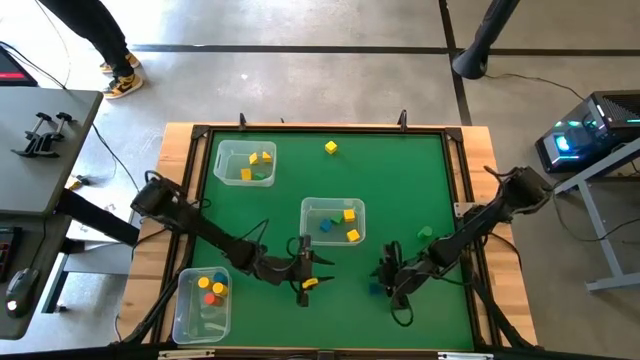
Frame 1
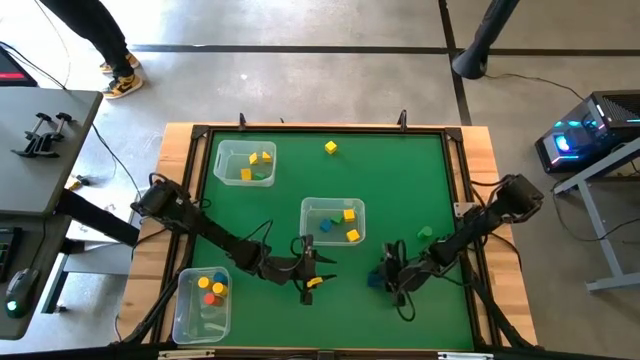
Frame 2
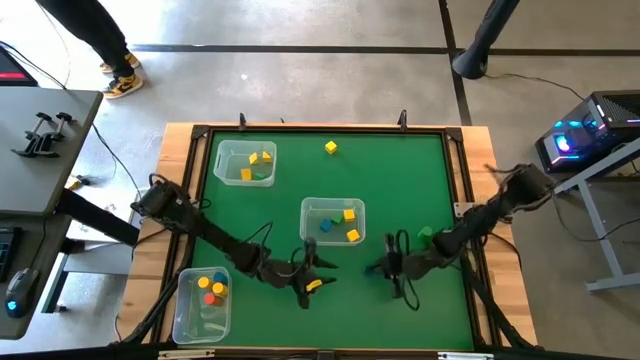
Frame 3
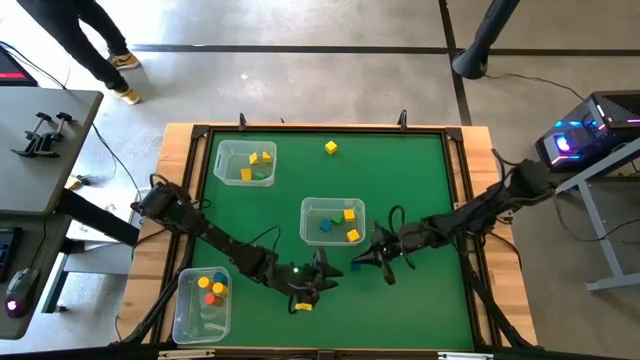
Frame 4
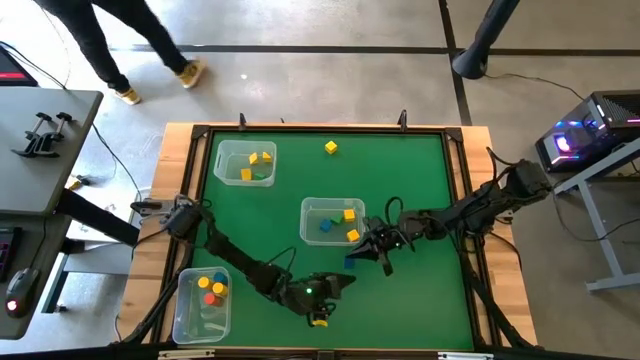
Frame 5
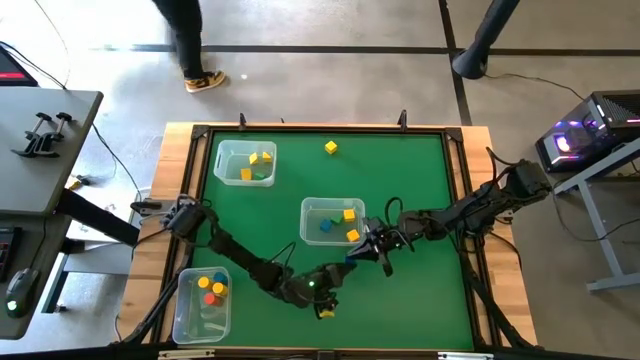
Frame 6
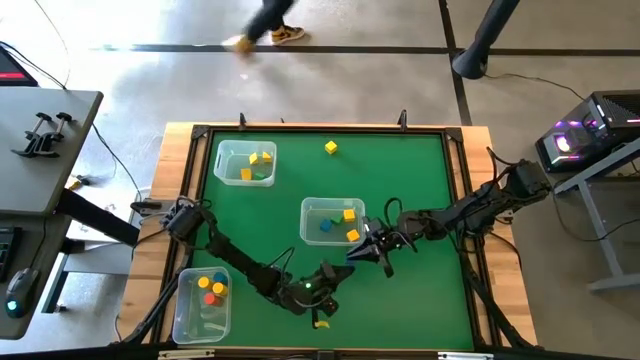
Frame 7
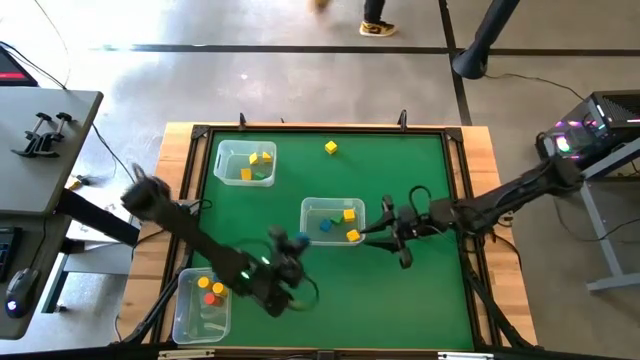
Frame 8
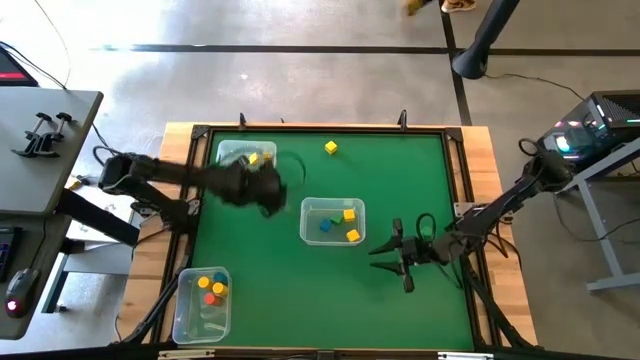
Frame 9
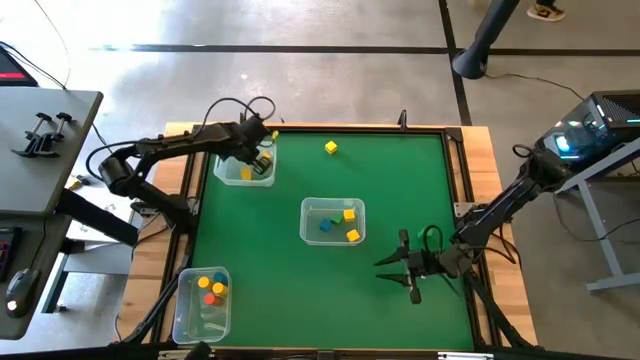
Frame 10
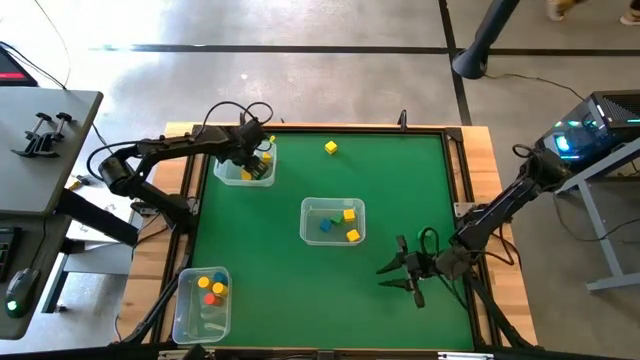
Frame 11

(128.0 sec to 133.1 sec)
Task: Sort blocks by size
Put the blue triangular block into the top left transparent bin

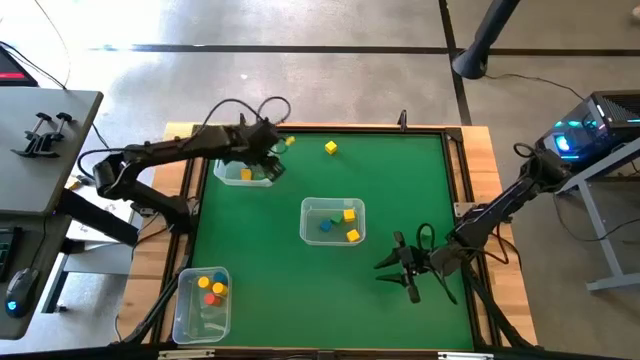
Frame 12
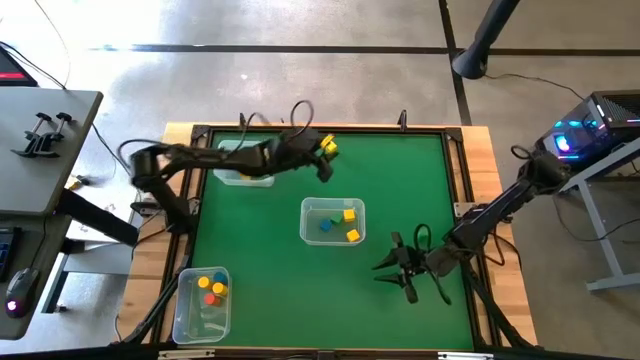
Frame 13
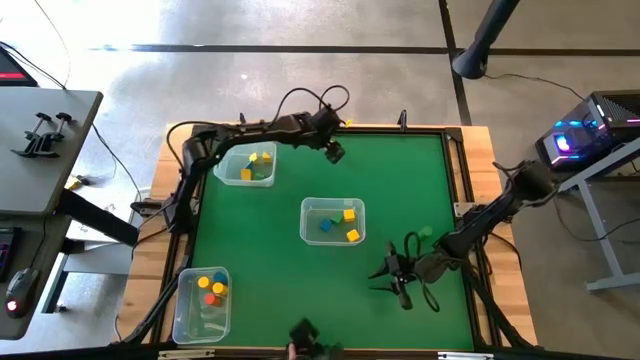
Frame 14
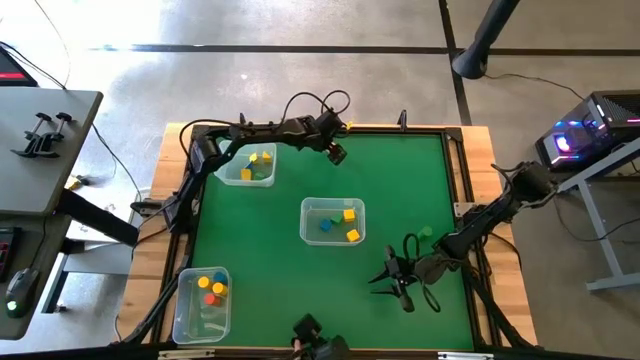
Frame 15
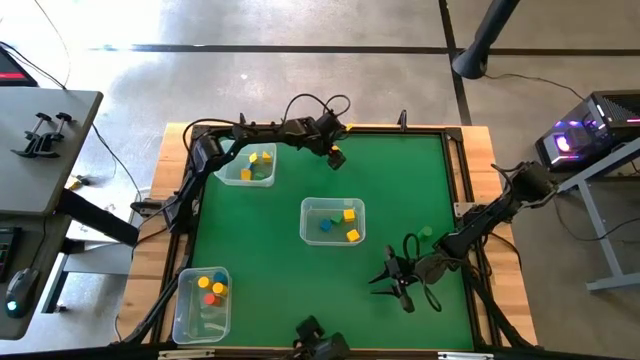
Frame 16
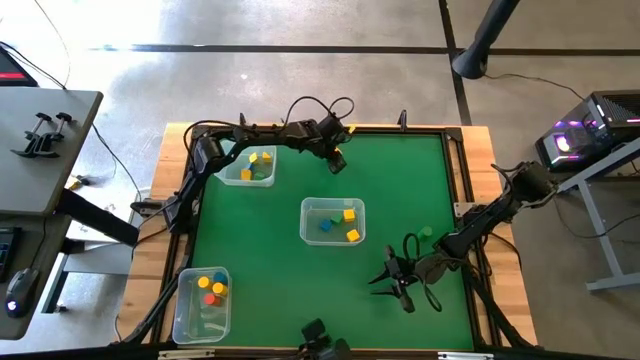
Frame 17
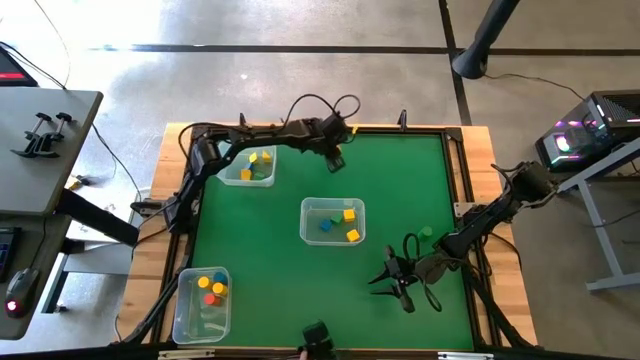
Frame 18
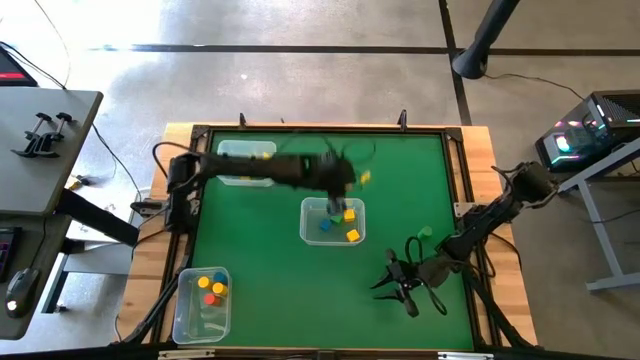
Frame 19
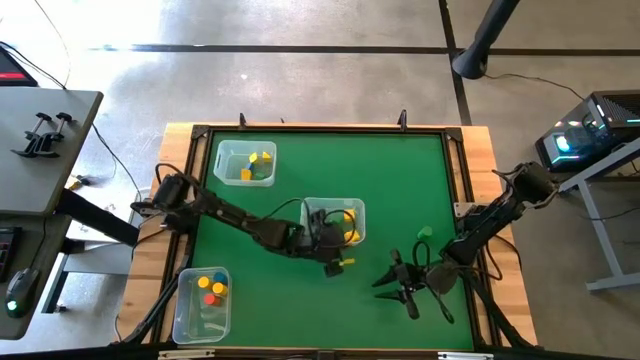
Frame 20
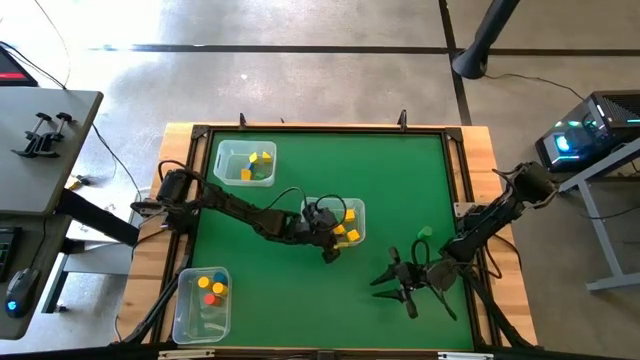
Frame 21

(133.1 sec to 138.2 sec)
Put the yellow cube block into the middle right transparent bin

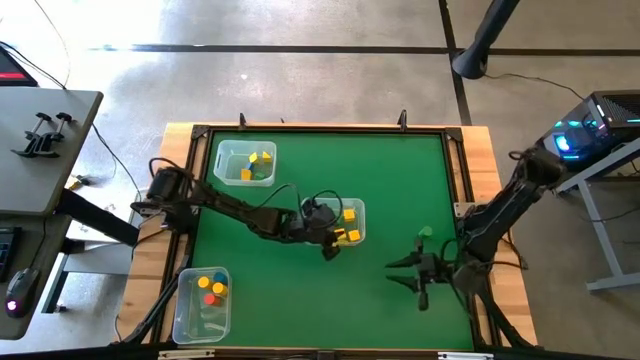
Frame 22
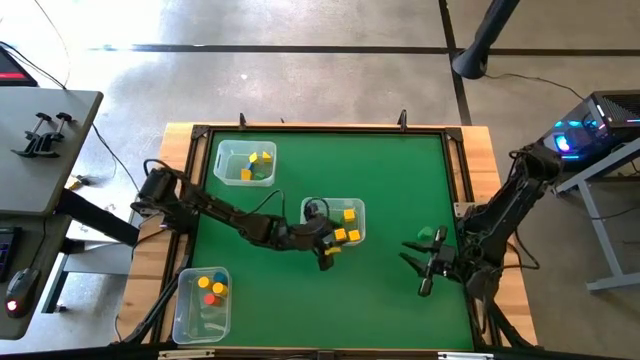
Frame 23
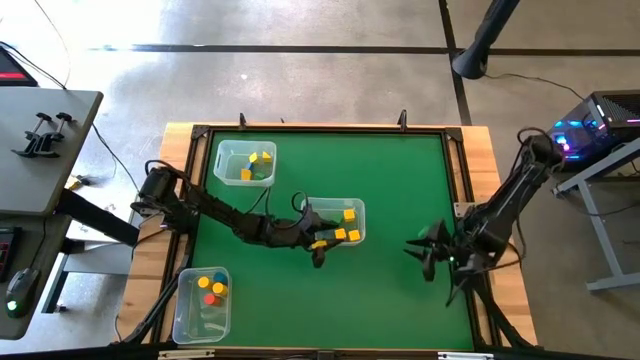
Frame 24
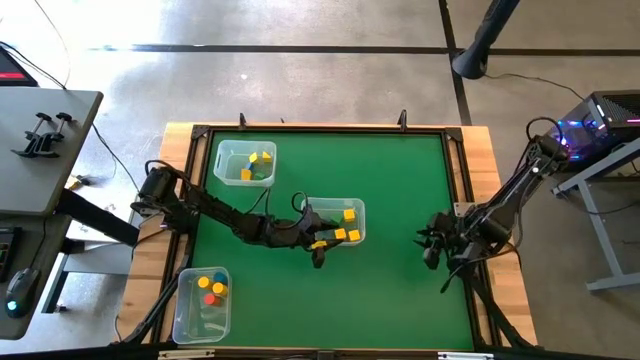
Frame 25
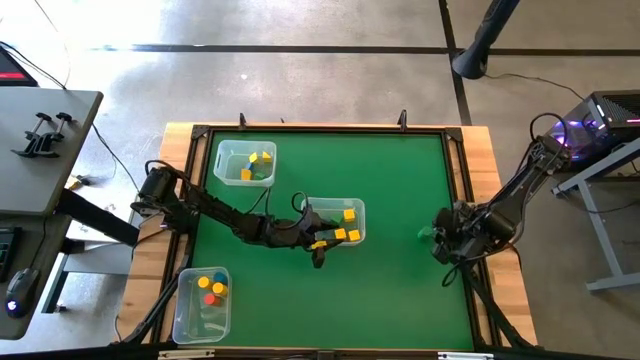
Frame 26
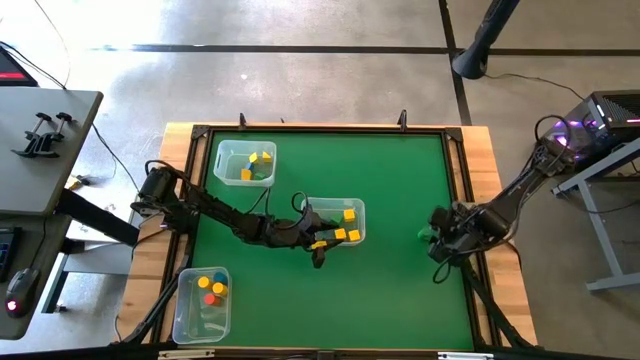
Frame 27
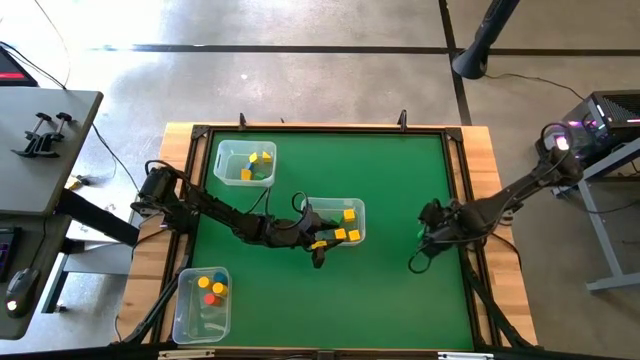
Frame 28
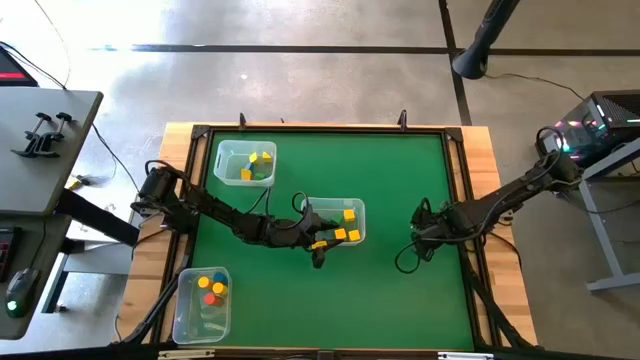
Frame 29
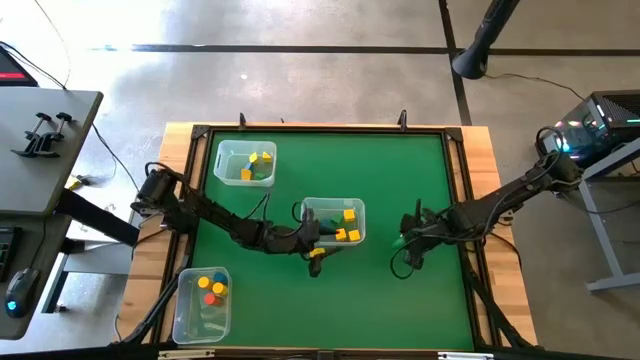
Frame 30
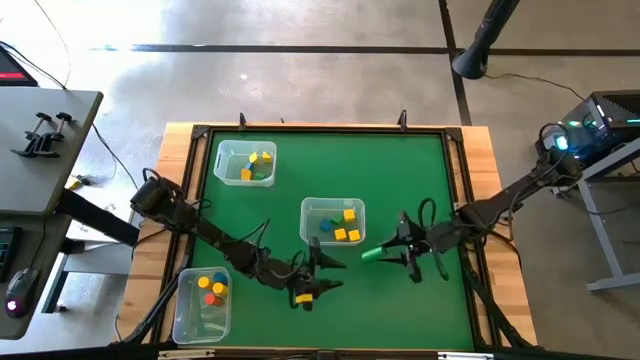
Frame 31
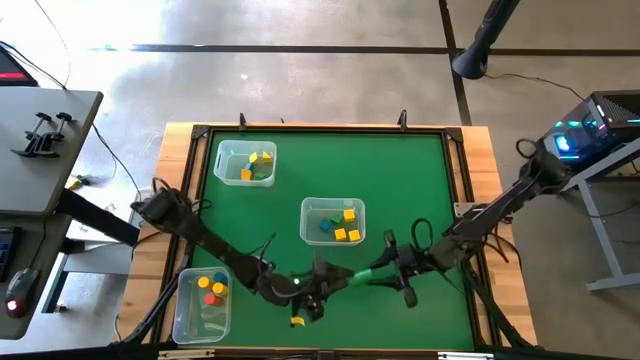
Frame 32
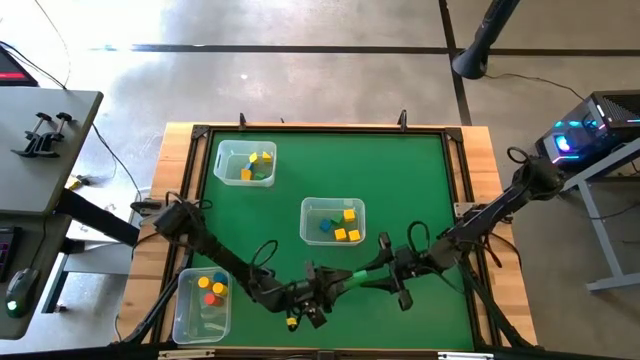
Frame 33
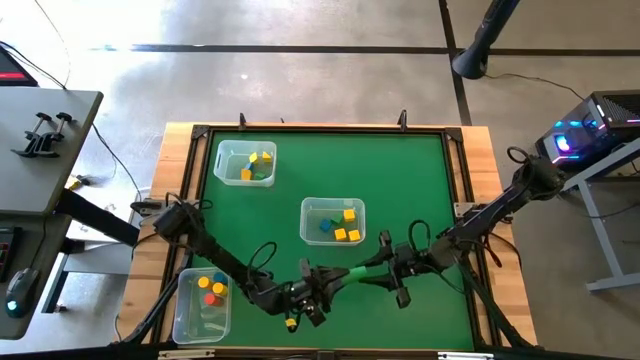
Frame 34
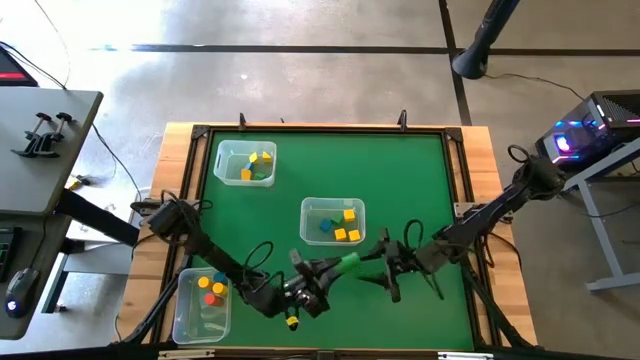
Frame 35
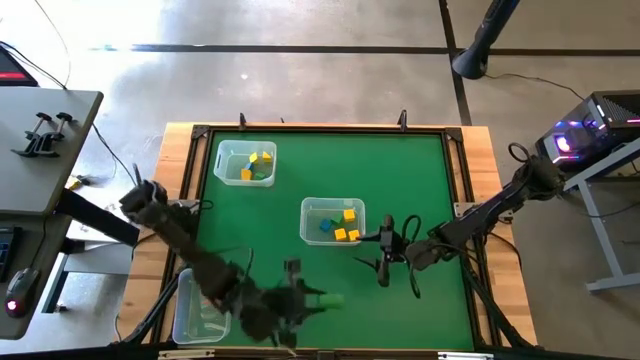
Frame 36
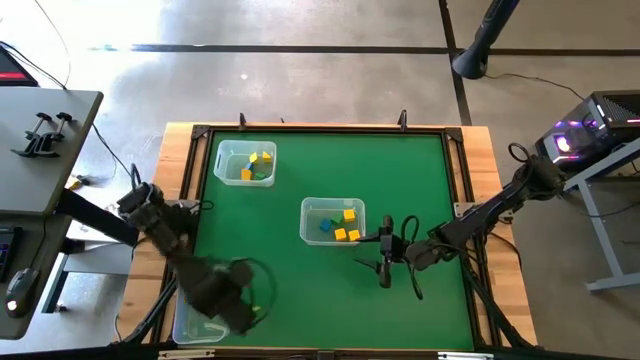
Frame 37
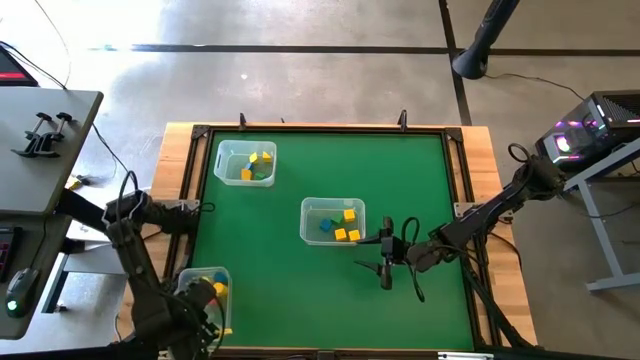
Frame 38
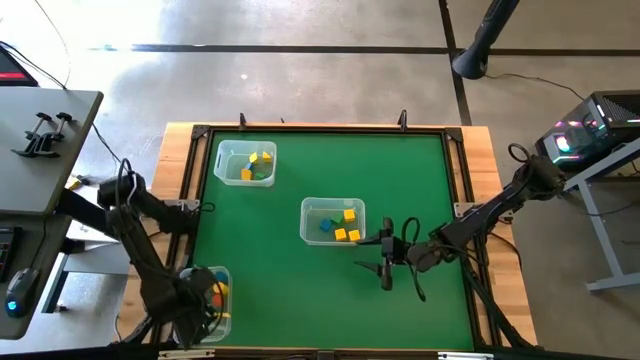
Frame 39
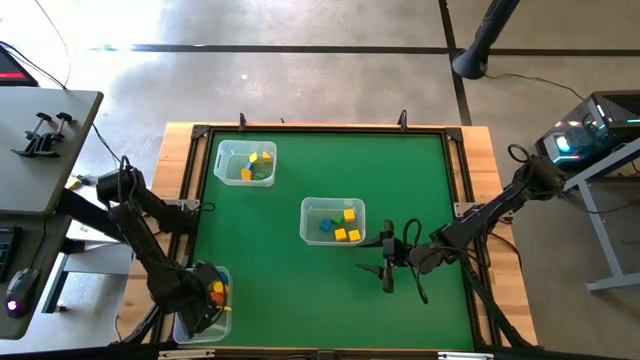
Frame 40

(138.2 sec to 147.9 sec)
Put the green cylindrical block into the bottom left transparent bin

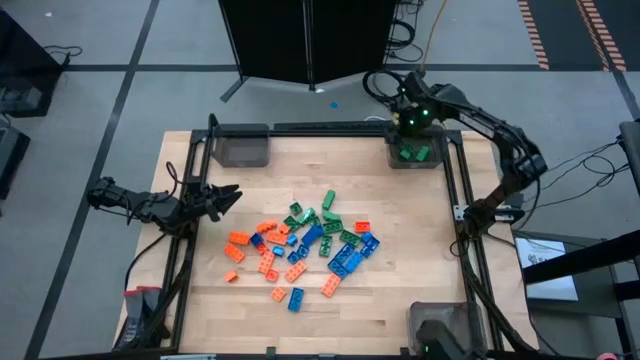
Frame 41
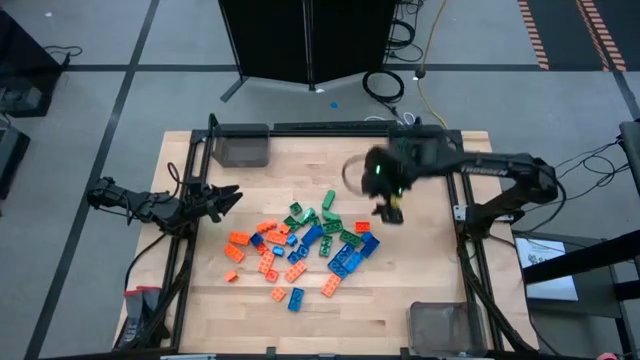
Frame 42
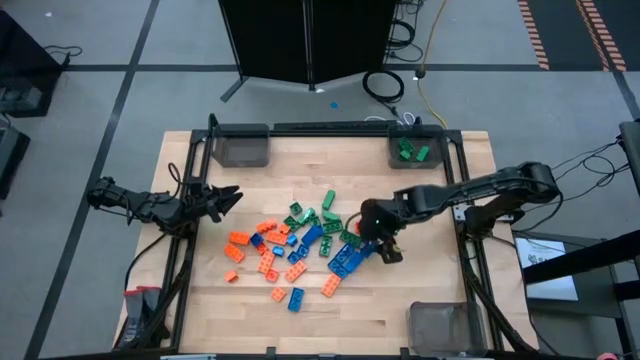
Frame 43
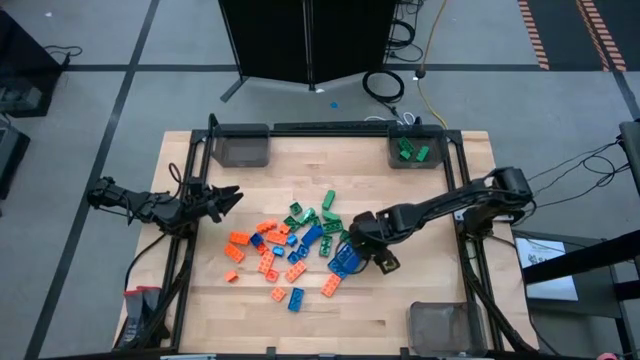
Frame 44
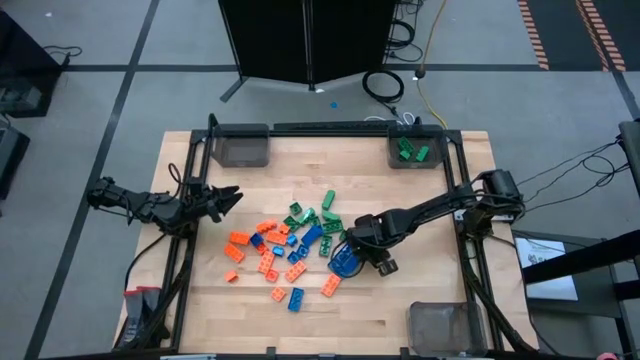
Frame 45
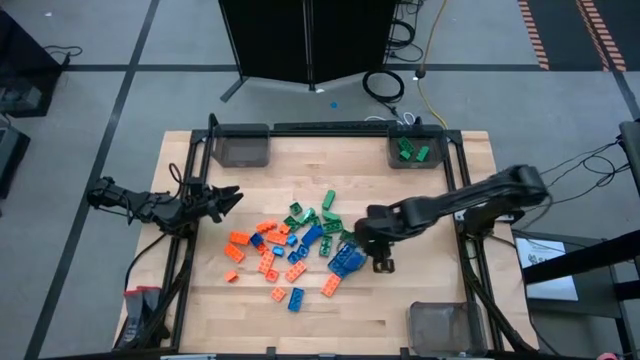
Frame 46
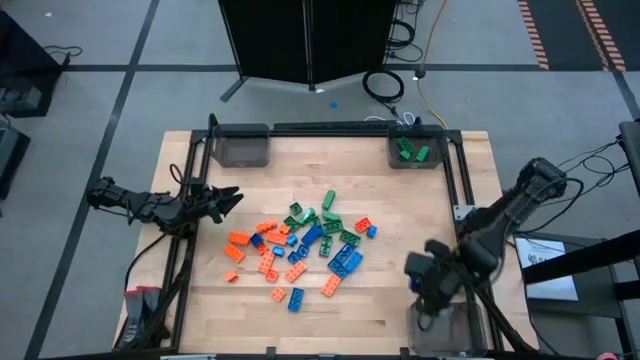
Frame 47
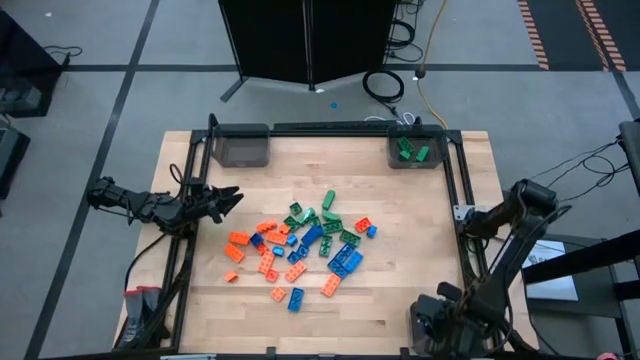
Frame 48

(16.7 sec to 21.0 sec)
Task: Sort blocks
Put the blue game piece into the bottom black bin
